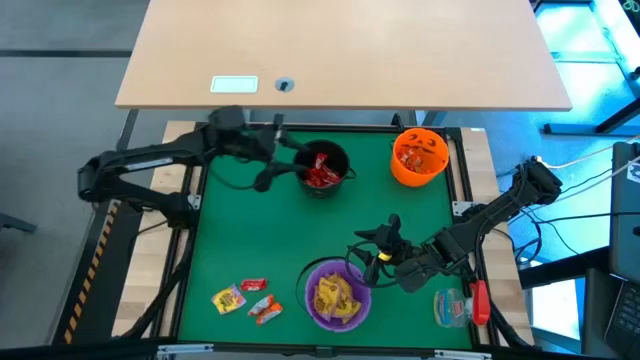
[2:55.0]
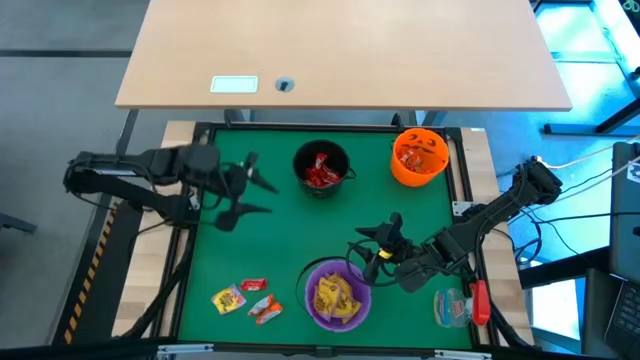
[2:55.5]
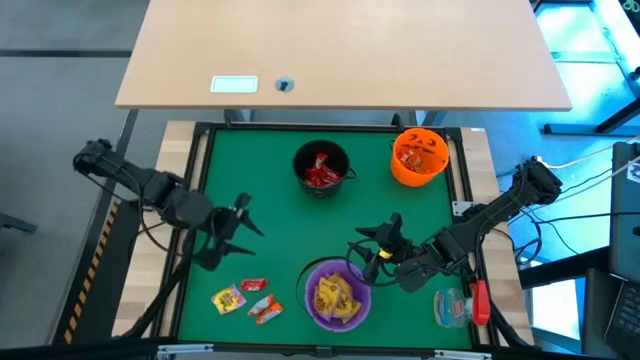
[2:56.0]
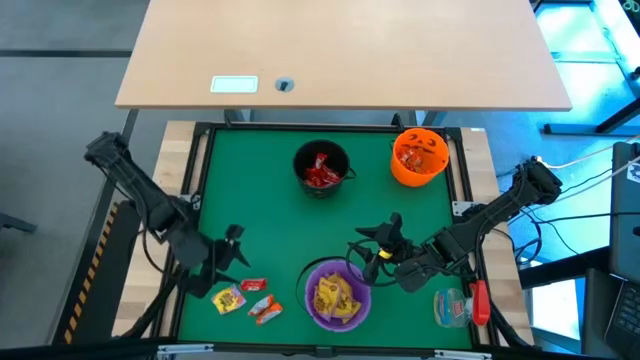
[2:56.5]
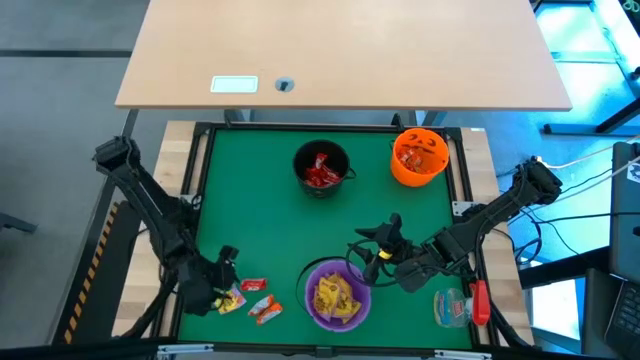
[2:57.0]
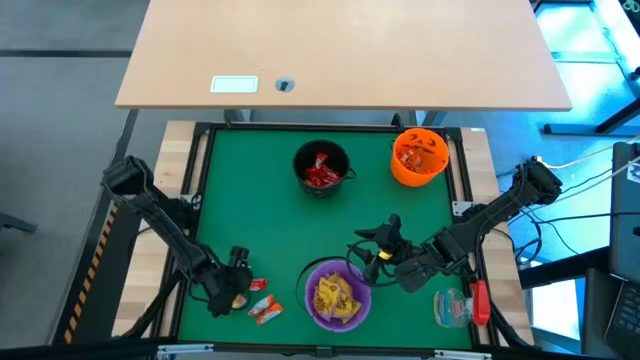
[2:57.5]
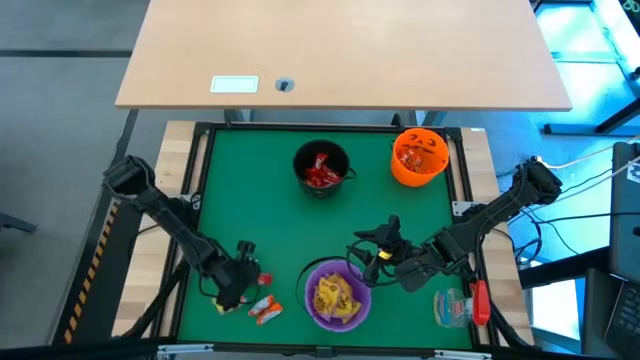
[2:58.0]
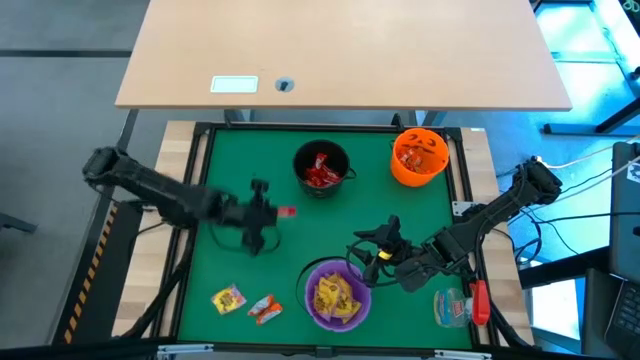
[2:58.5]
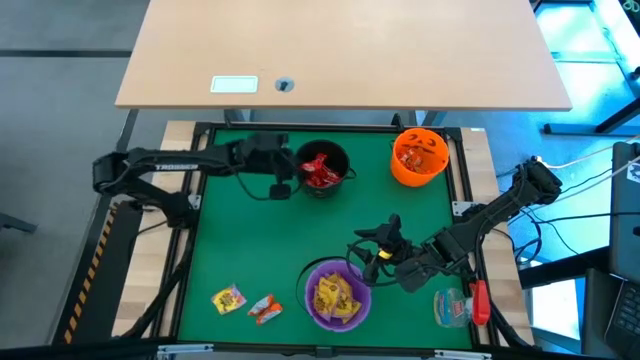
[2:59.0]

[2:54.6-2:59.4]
Task: Sort candy
Put the red candy into the black bucket

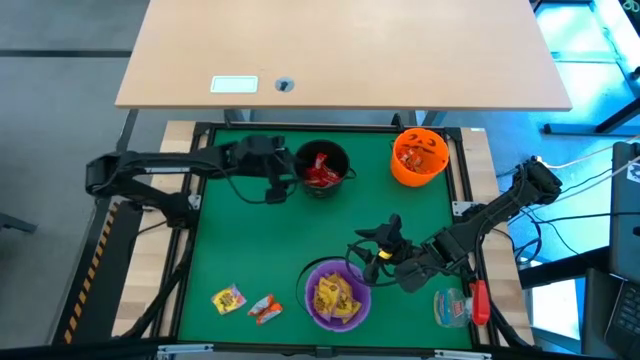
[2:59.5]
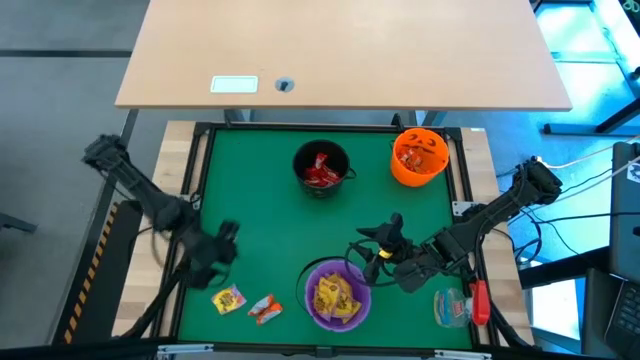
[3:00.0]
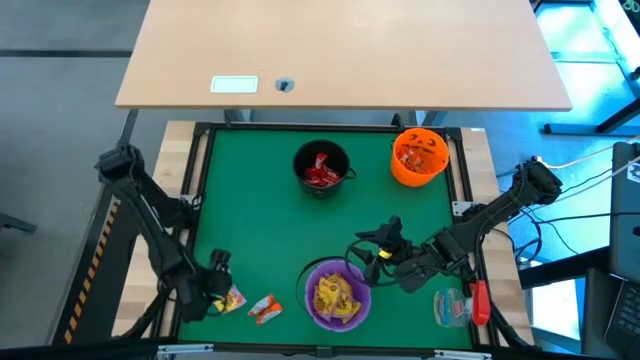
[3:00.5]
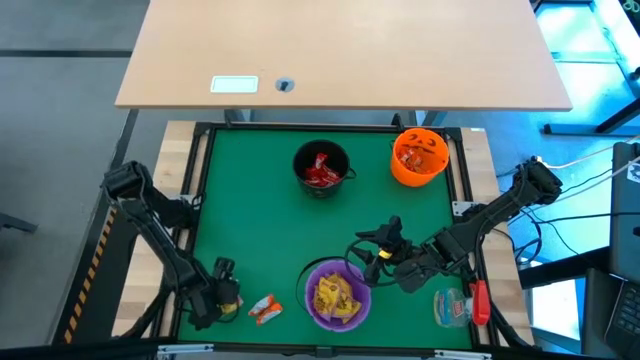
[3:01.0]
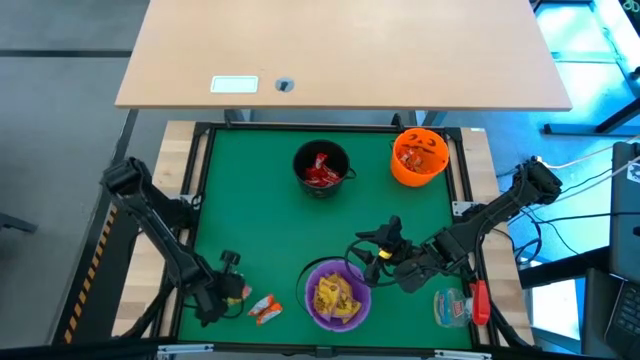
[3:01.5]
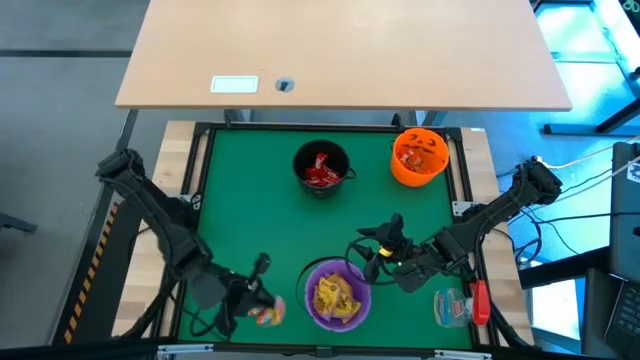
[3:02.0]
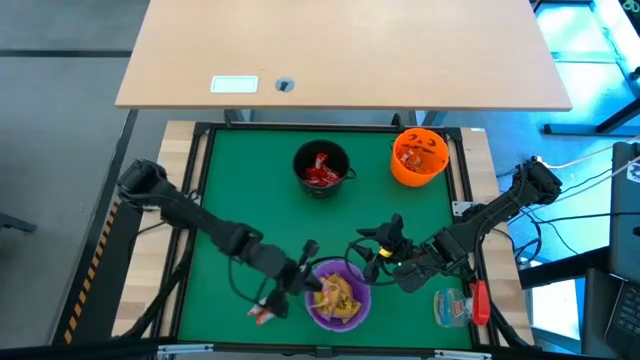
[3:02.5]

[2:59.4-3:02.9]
Put the yellow candy into the purple bucket

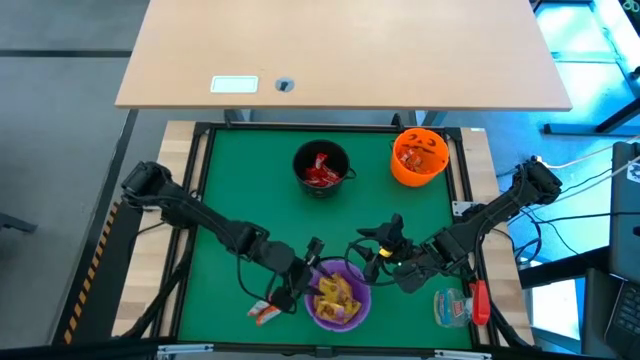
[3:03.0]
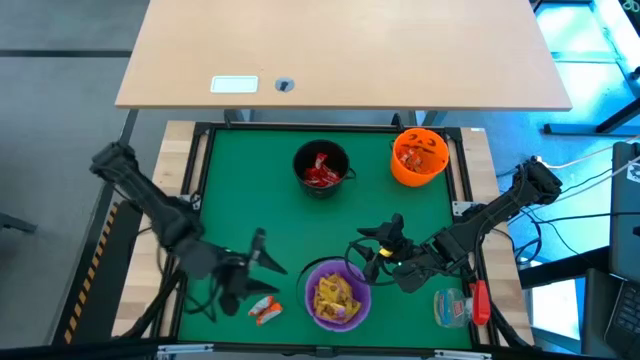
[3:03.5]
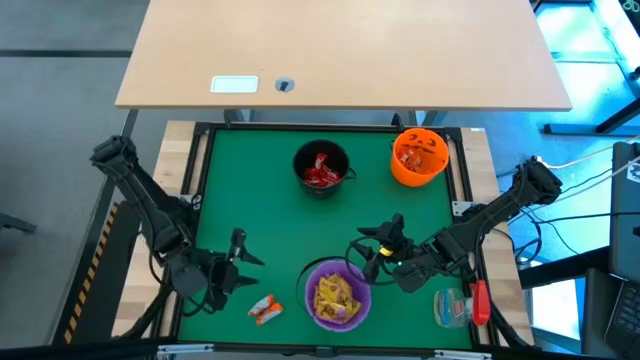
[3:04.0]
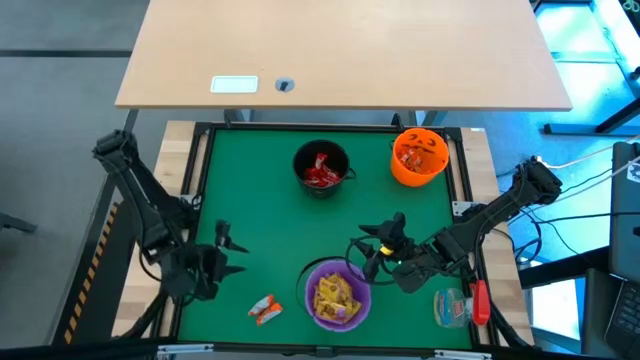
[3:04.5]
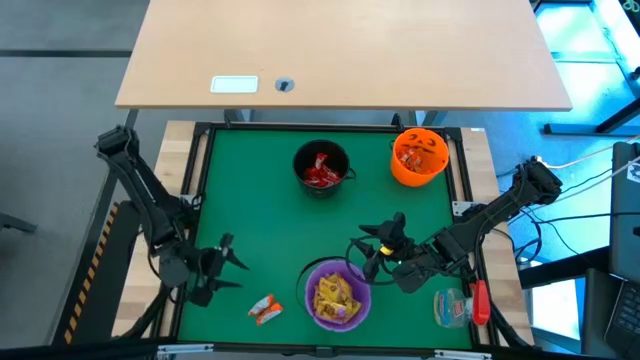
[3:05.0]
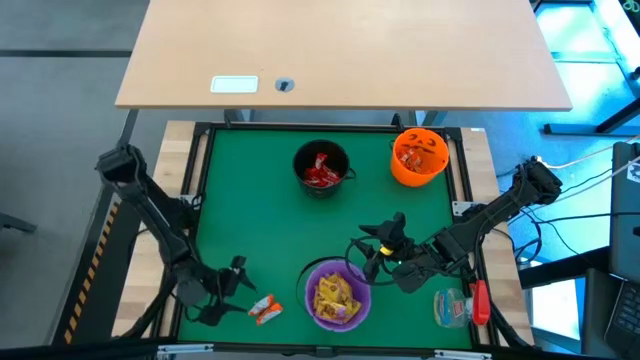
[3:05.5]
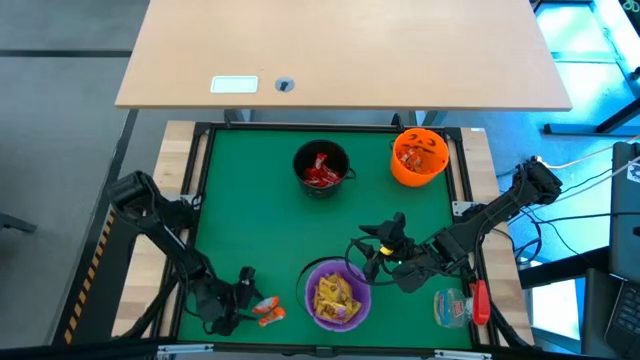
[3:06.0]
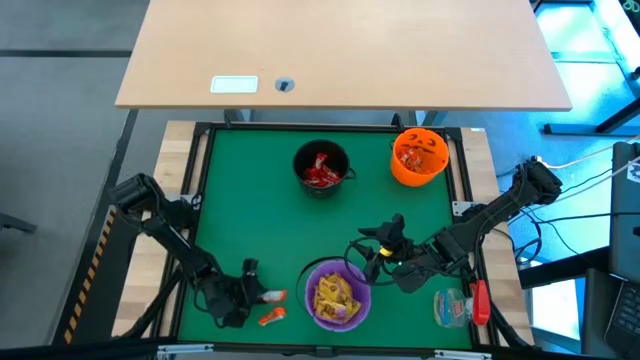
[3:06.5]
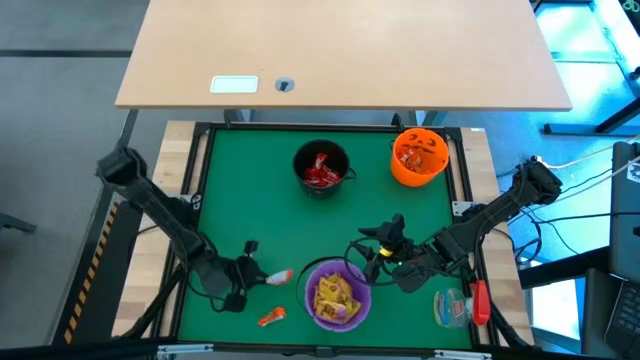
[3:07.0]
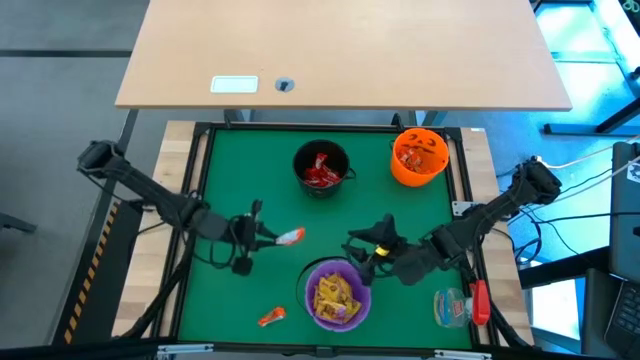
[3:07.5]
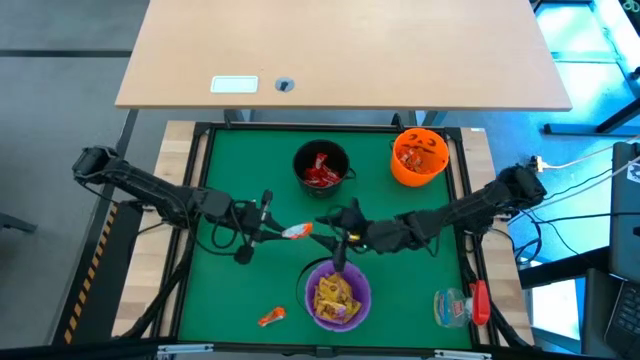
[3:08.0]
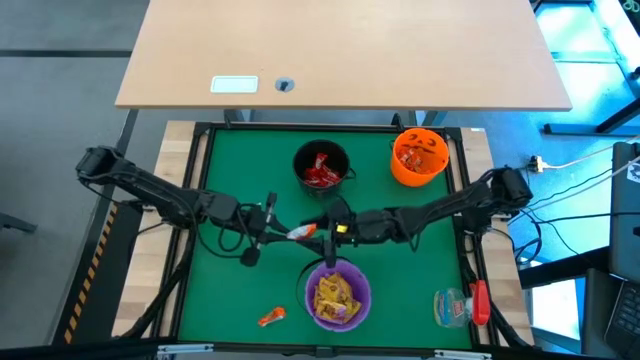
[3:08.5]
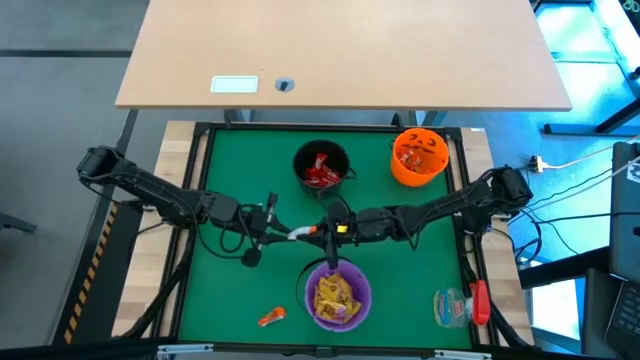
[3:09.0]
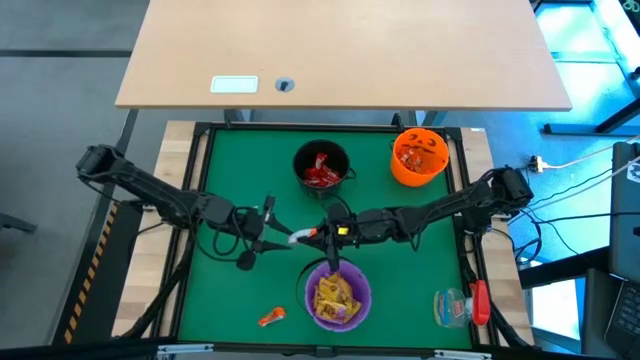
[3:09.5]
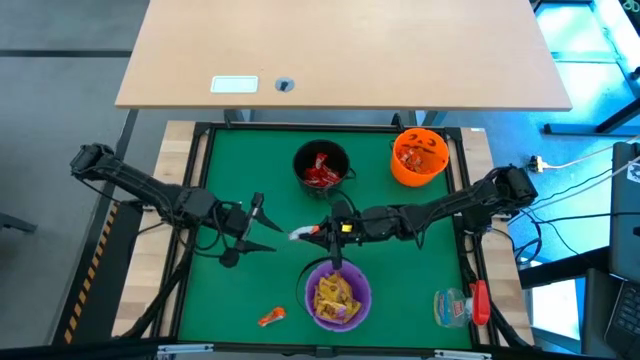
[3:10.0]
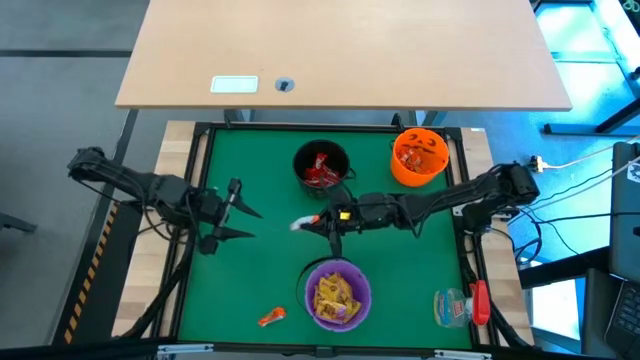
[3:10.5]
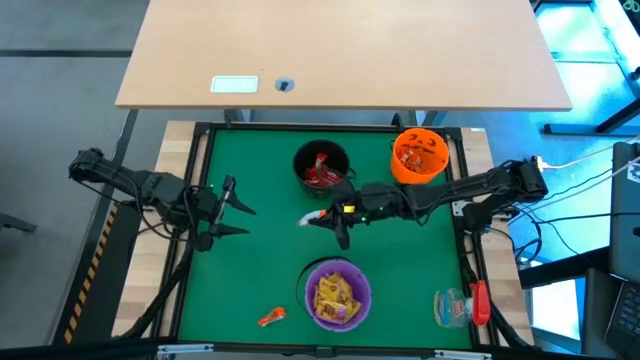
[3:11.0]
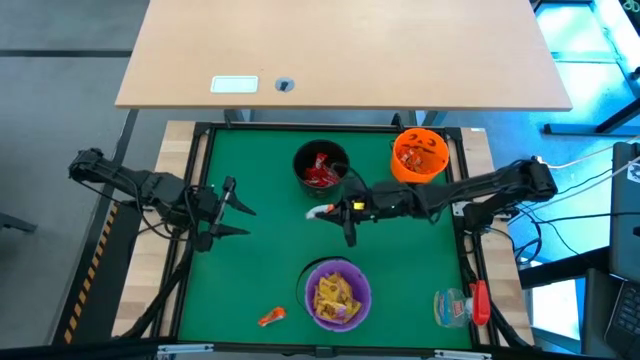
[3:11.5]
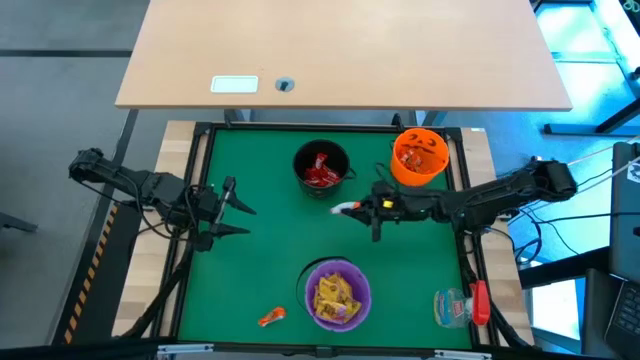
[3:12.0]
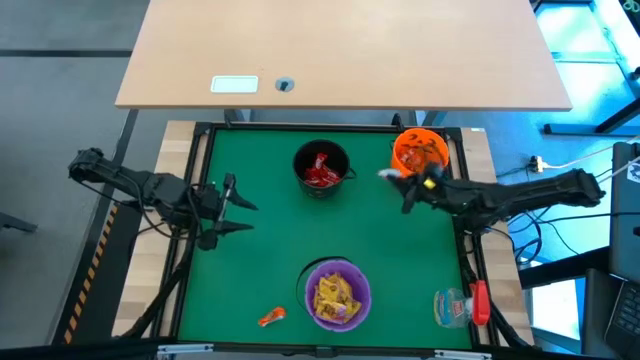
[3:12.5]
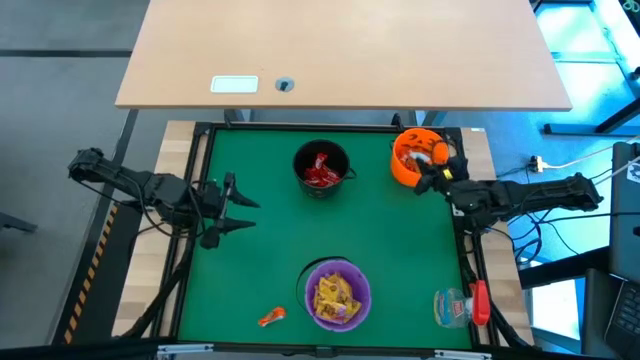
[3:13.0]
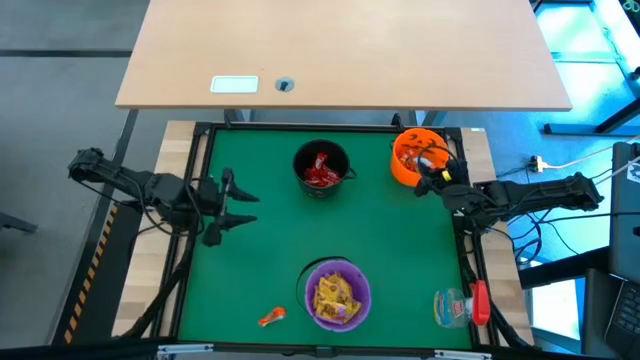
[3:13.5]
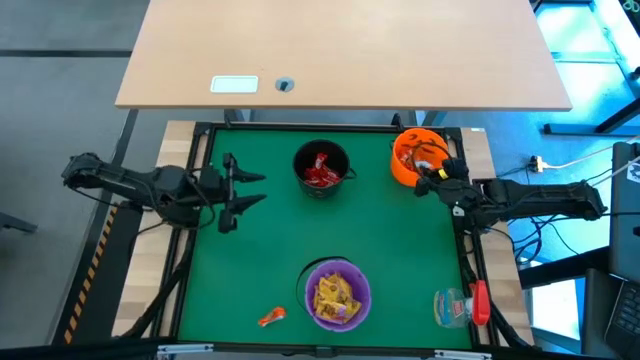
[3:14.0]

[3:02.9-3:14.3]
Put the orange candy into the orange bucket

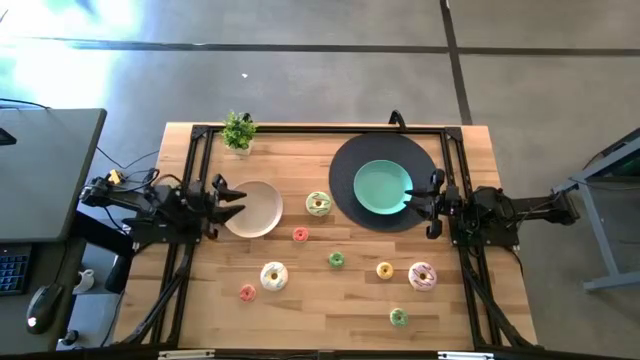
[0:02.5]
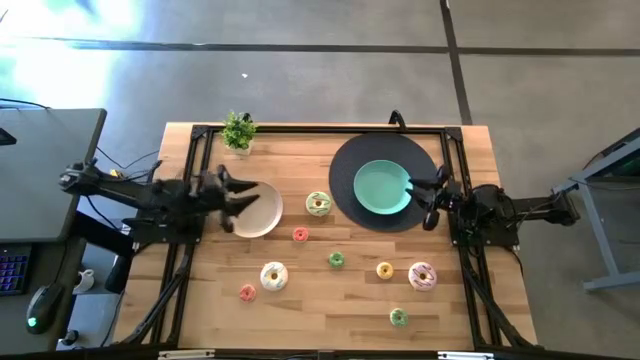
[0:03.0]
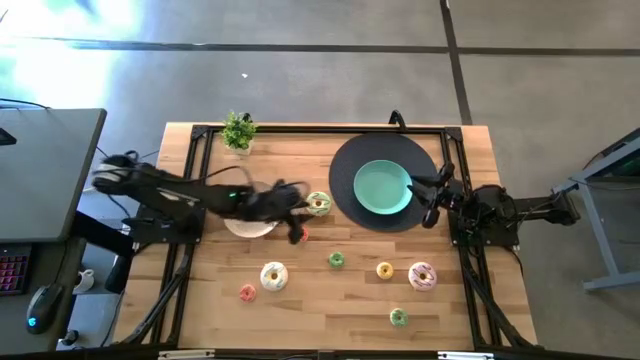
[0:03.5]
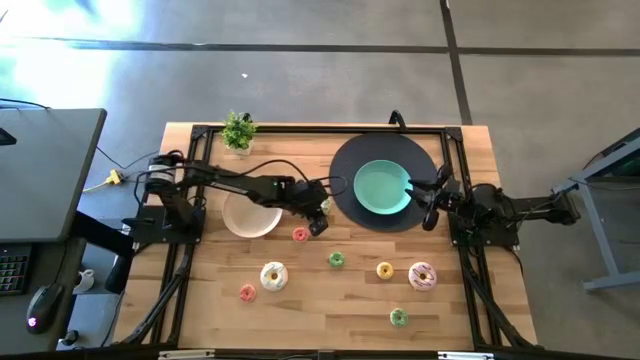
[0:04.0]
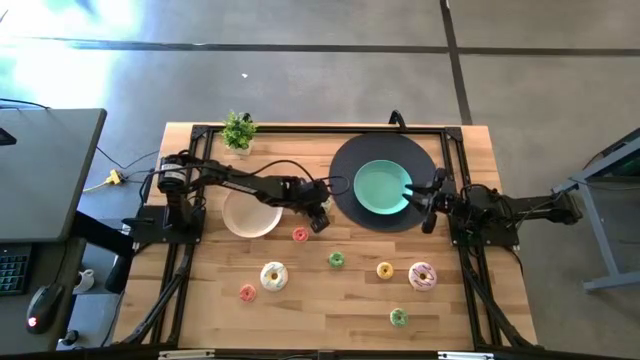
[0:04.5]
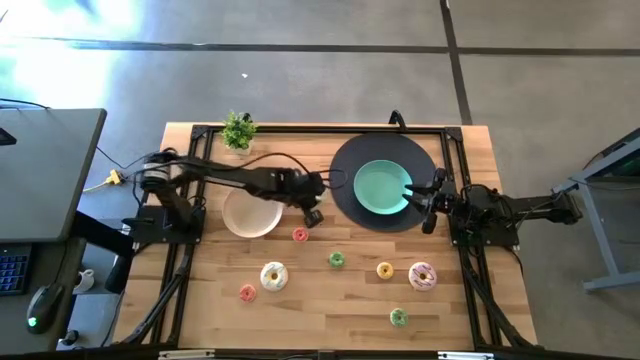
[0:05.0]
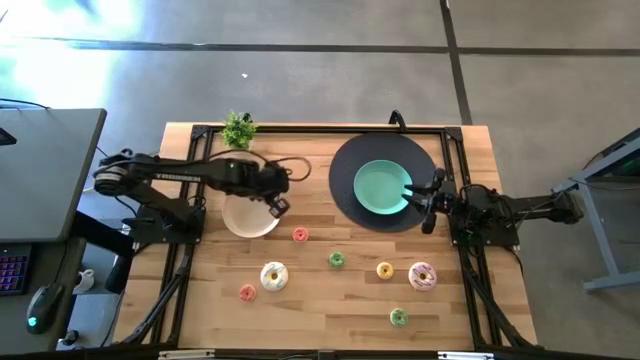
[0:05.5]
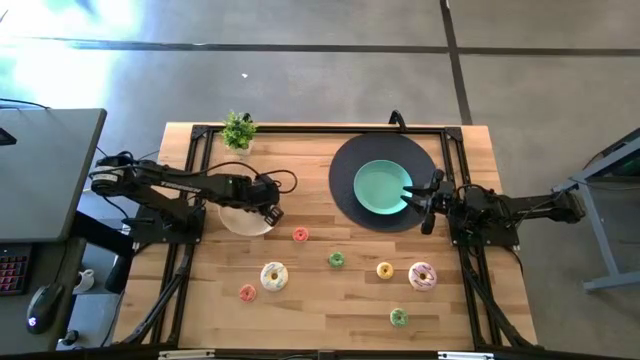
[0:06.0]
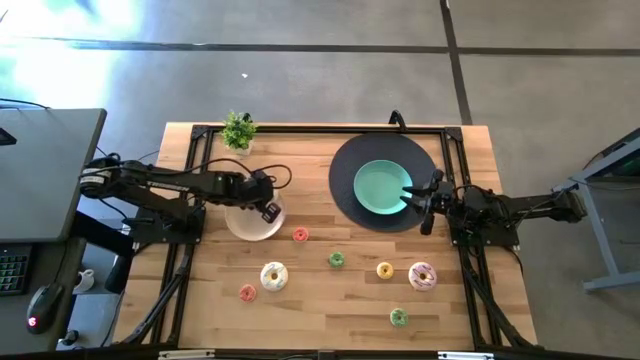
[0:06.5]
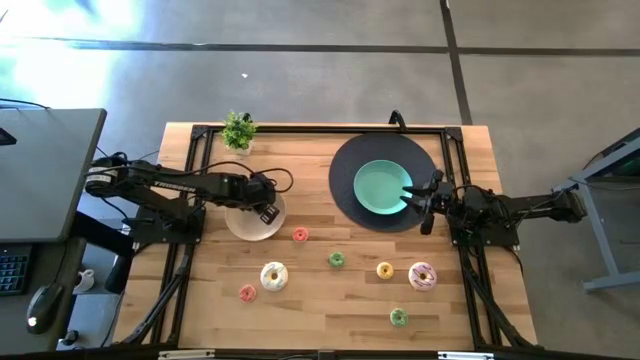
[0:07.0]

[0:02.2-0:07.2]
Task: Pick & Place donuts
Put the large blue donut on the white plate
